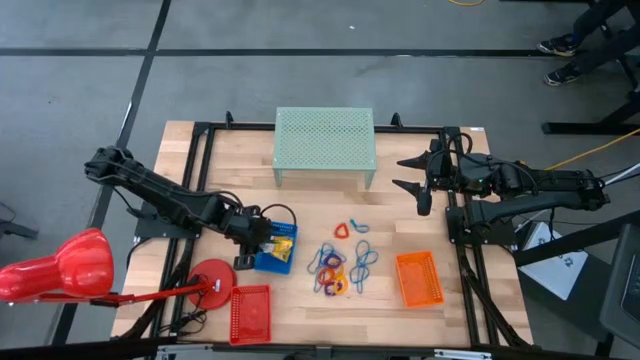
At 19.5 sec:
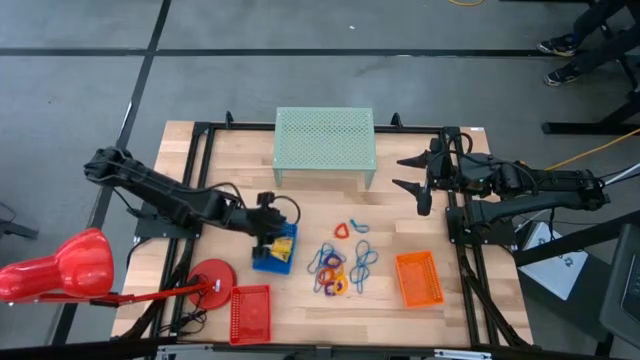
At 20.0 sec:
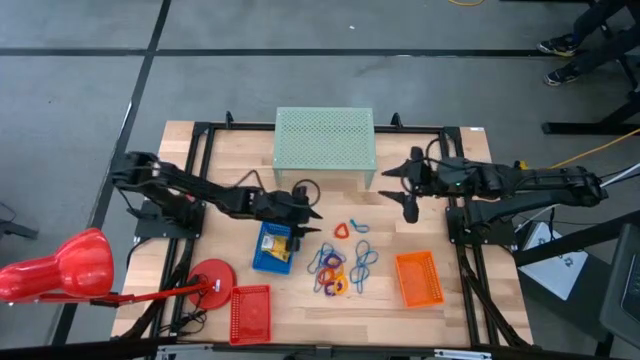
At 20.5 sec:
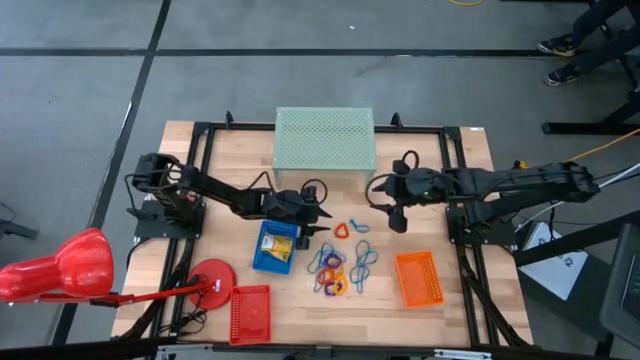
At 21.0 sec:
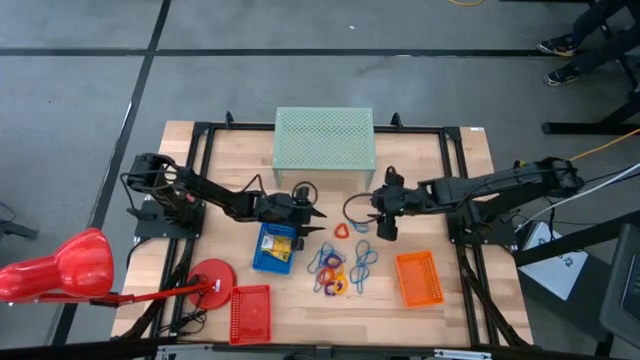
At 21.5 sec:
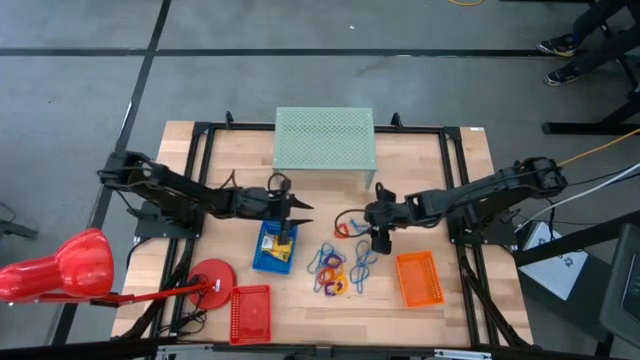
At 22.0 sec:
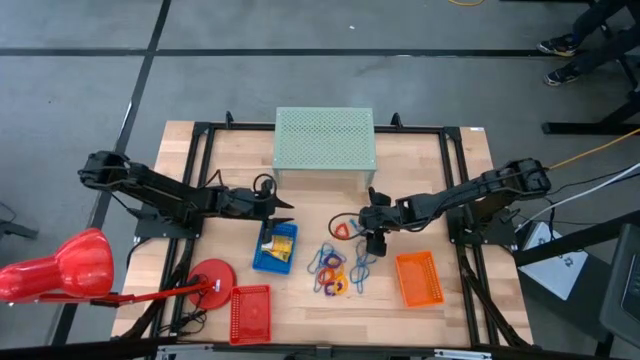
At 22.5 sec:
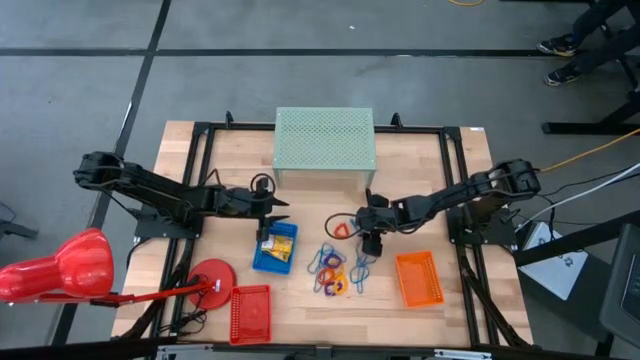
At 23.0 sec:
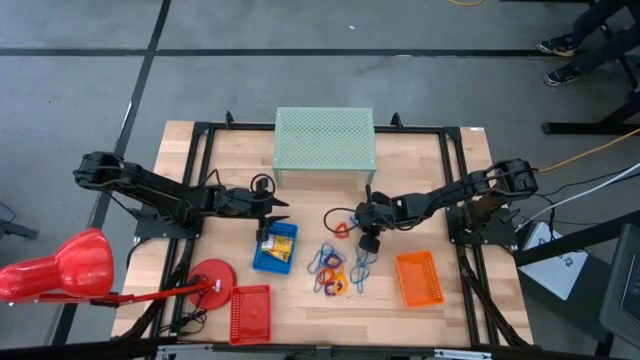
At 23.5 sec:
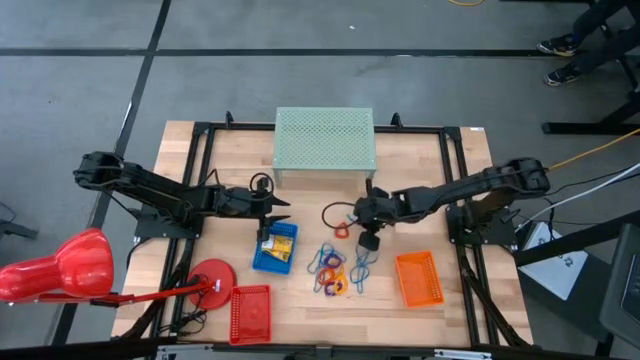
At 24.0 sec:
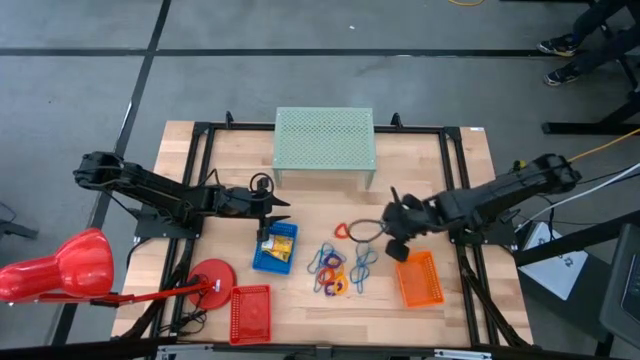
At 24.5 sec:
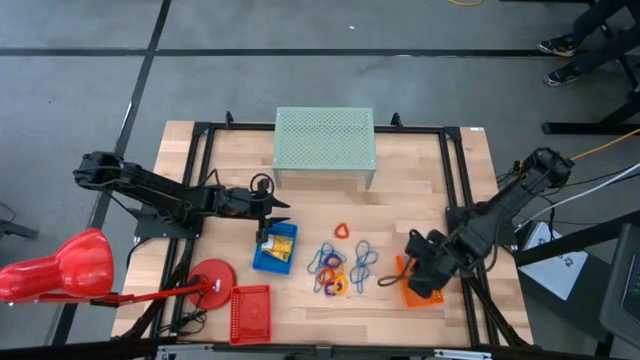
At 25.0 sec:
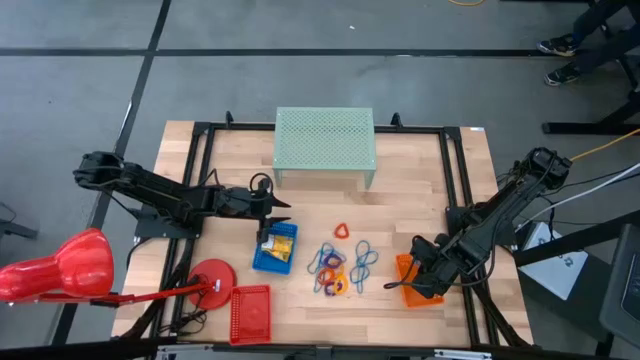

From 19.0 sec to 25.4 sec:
Task: Pick & Place Office Desk Supplies
Put the blue rubber band into the orange bin

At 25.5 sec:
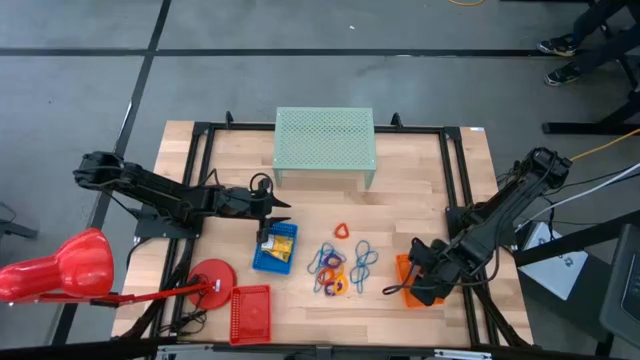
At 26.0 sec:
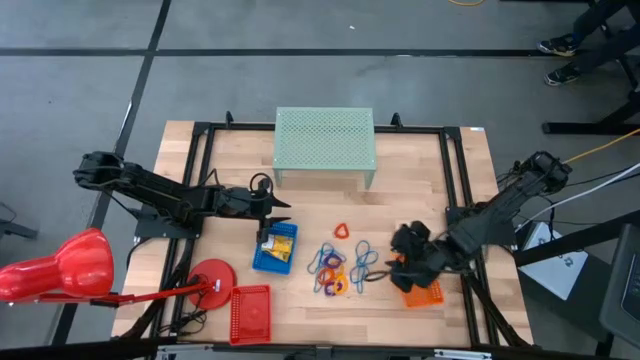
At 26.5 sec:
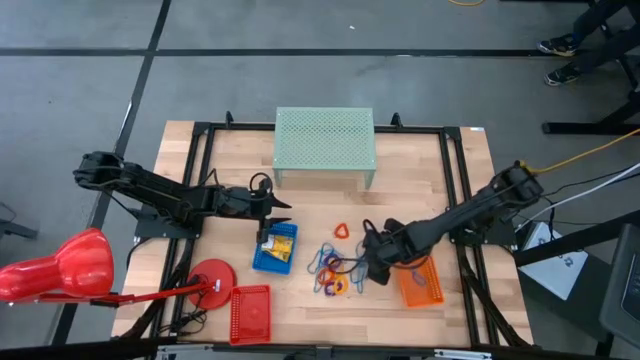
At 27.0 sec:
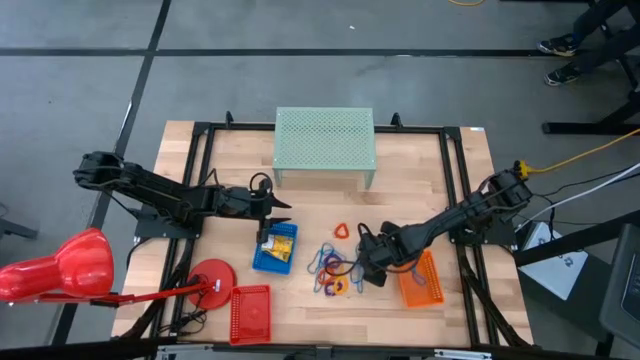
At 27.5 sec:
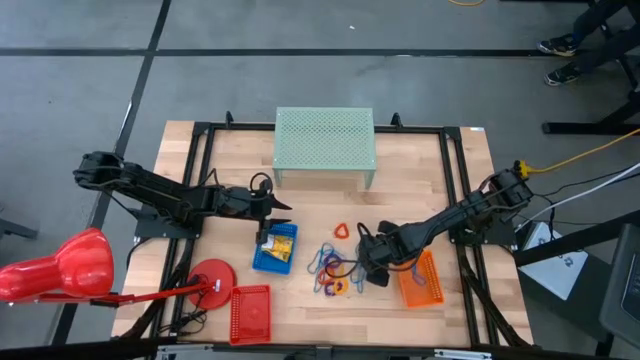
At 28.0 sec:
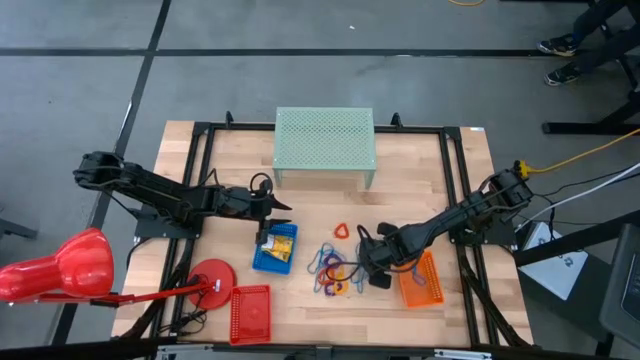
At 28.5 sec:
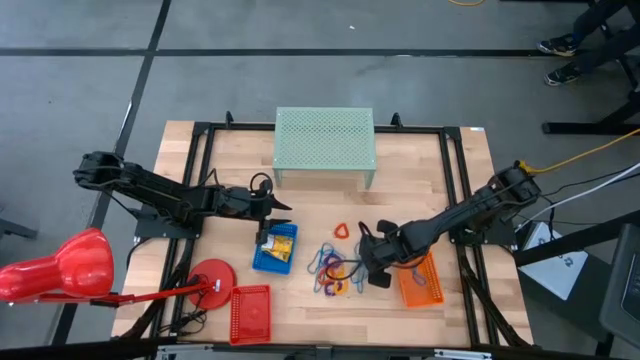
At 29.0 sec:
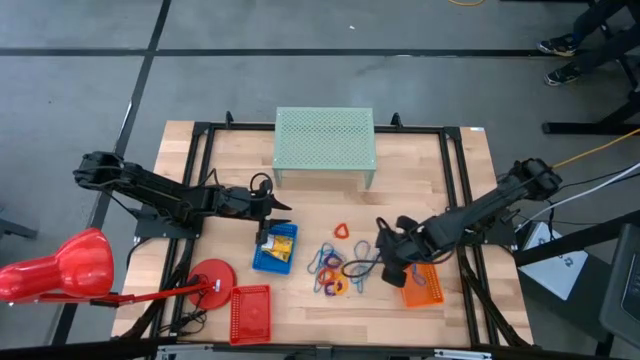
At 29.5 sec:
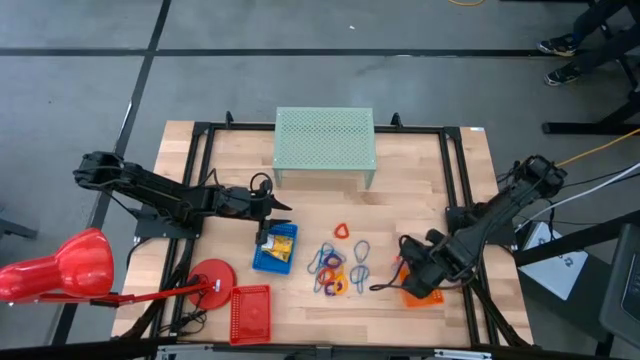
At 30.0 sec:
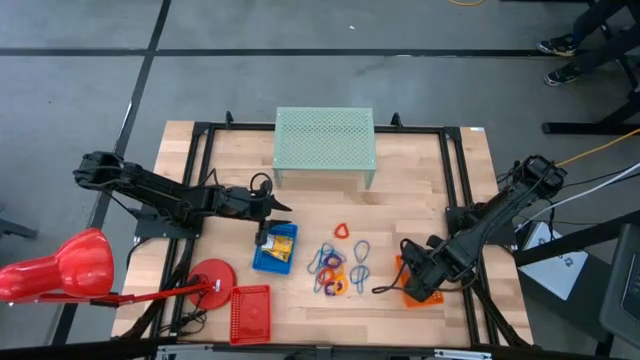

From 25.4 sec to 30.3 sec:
Put the blue rubber band into the orange bin

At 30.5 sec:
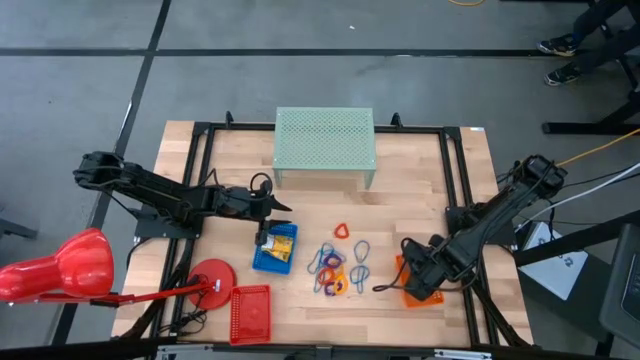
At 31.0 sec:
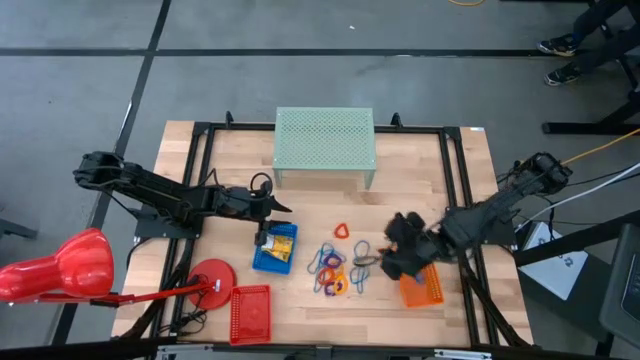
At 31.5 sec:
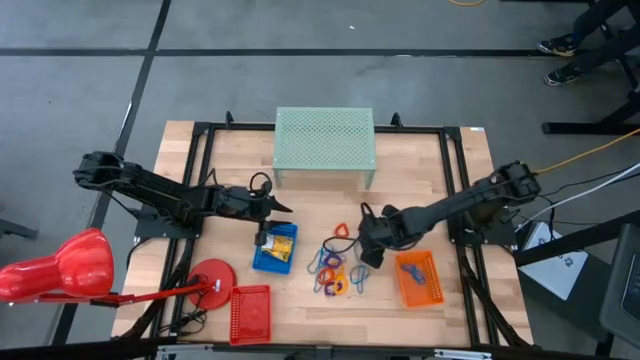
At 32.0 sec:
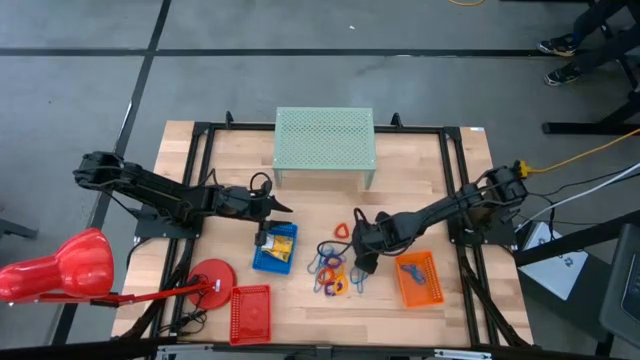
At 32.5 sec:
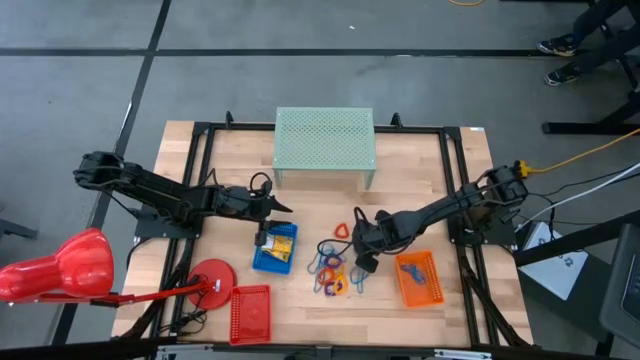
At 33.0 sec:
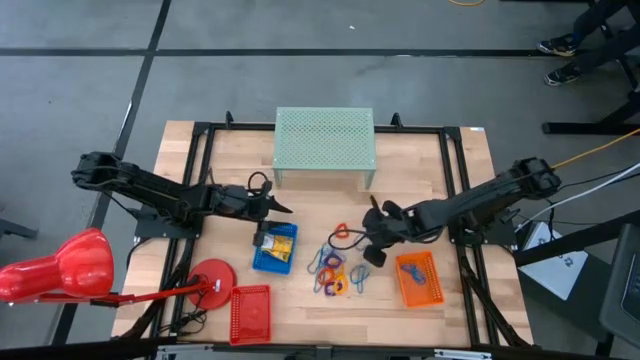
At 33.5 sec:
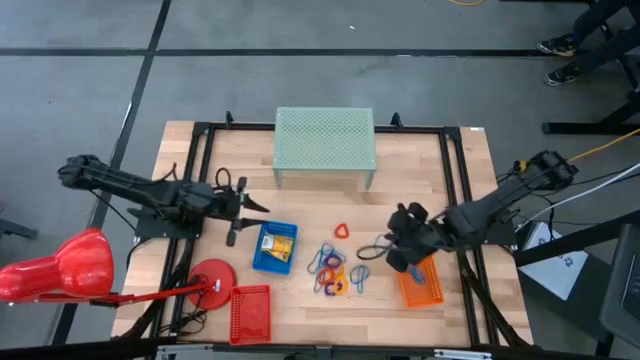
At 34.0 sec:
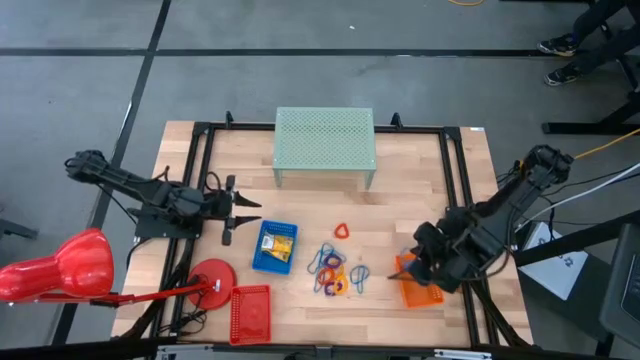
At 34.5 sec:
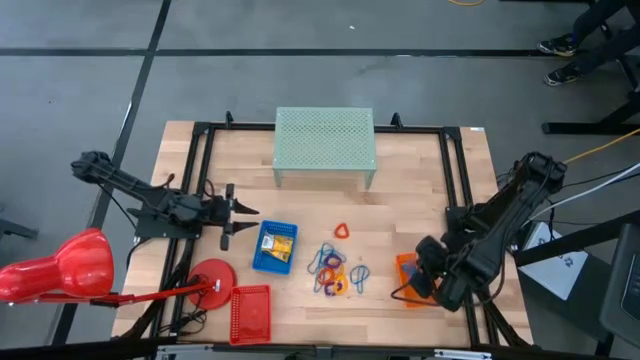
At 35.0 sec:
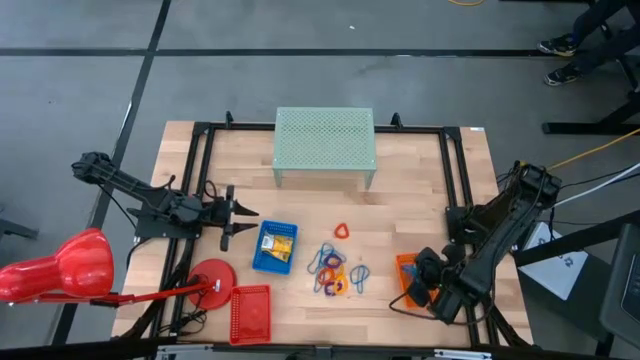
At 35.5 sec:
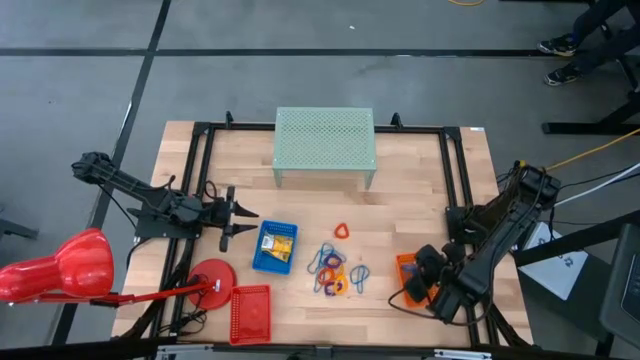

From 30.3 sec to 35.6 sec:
Put the blue rubber band into the orange bin

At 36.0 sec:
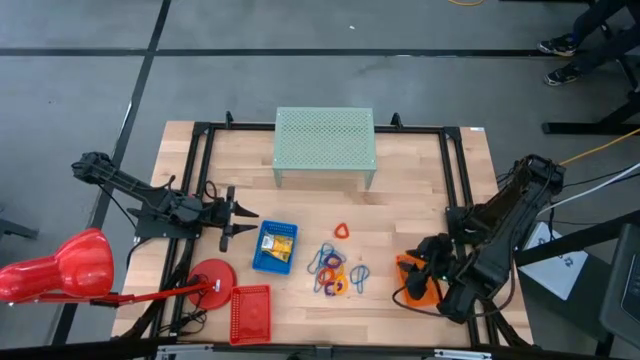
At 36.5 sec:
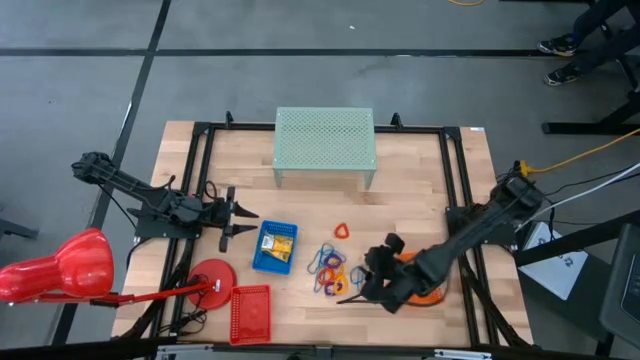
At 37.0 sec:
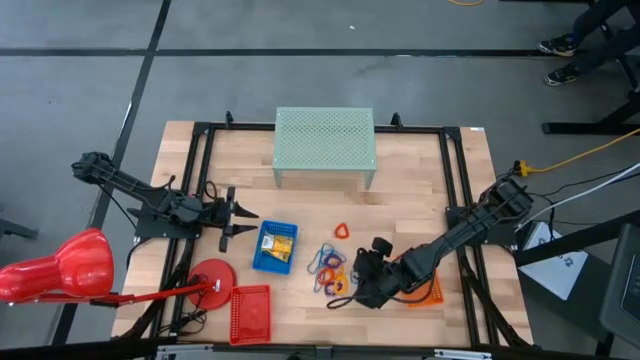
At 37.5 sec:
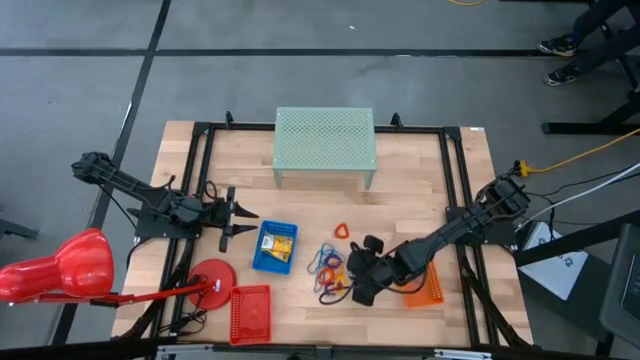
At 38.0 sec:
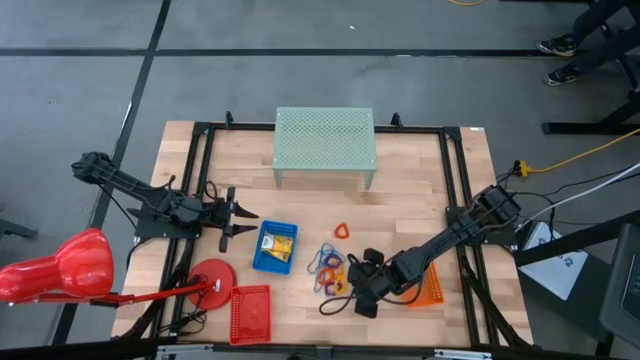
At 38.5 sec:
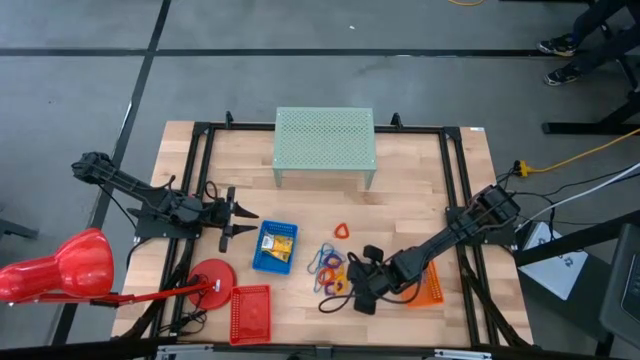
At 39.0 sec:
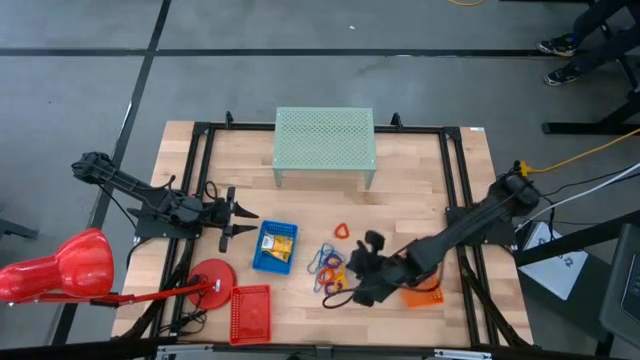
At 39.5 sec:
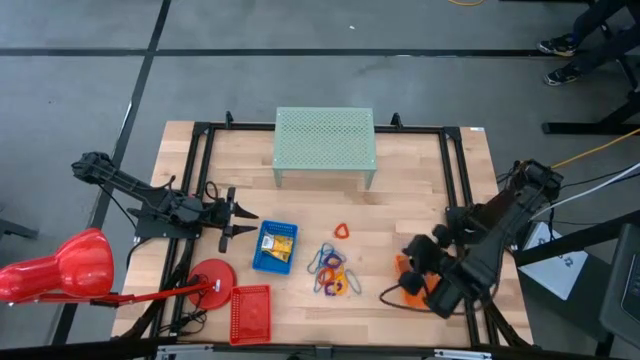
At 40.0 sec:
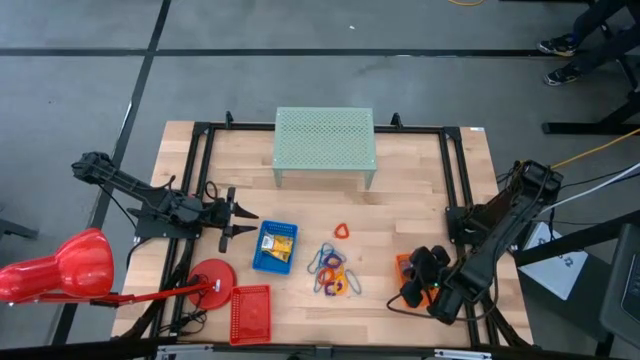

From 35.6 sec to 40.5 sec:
Put the blue rubber band into the orange bin
